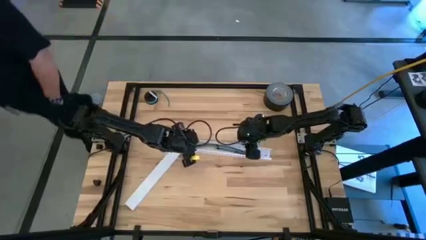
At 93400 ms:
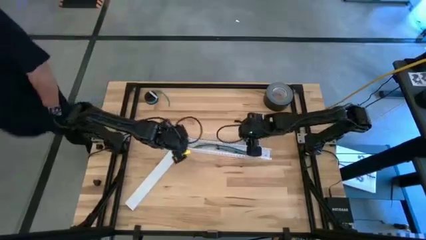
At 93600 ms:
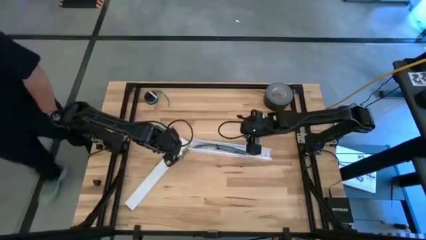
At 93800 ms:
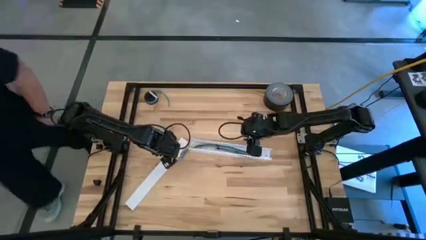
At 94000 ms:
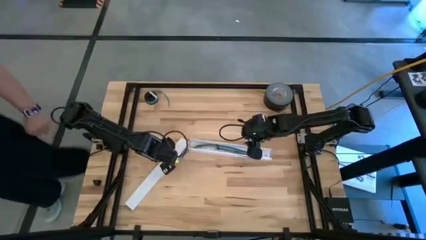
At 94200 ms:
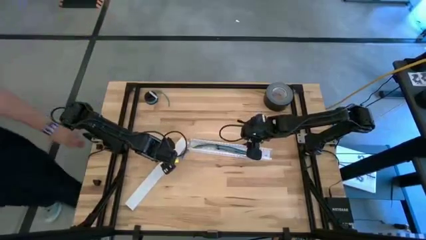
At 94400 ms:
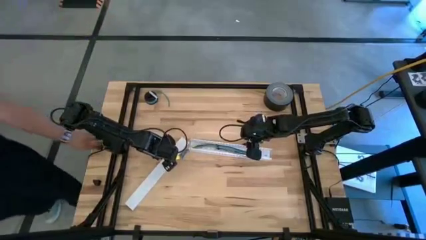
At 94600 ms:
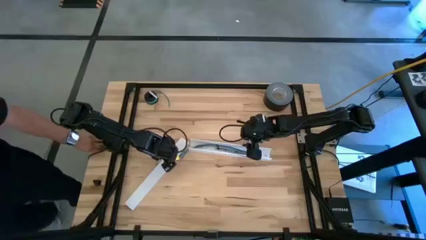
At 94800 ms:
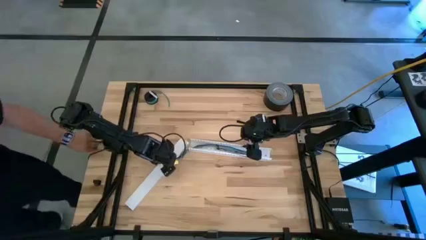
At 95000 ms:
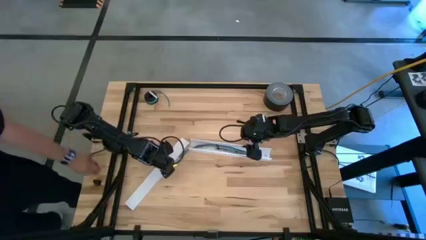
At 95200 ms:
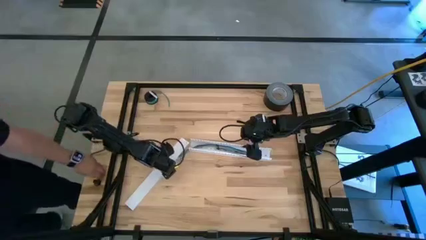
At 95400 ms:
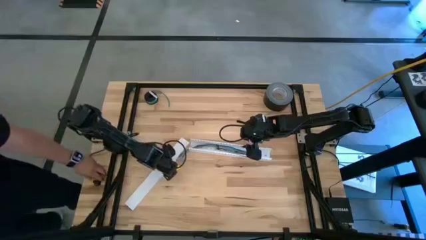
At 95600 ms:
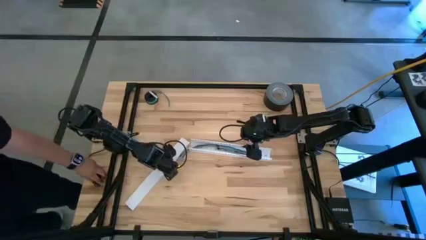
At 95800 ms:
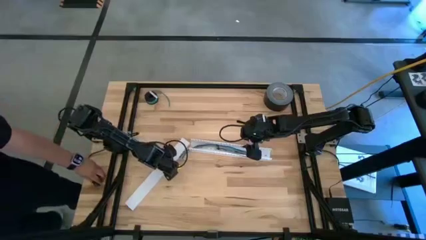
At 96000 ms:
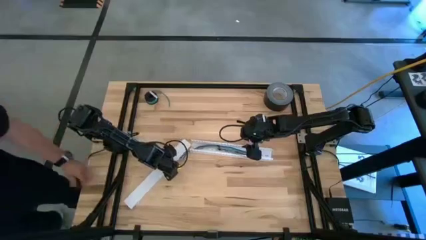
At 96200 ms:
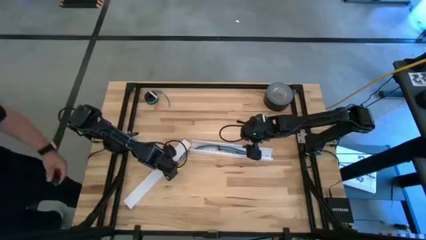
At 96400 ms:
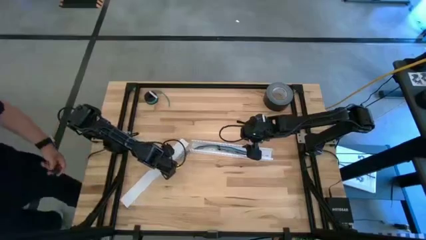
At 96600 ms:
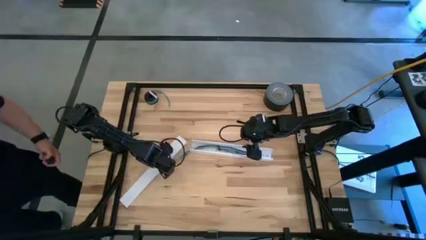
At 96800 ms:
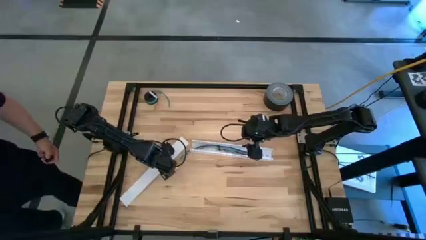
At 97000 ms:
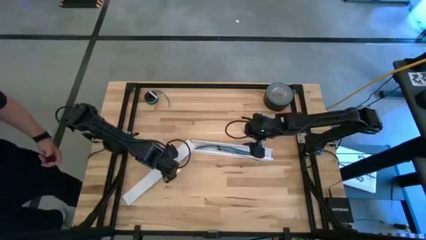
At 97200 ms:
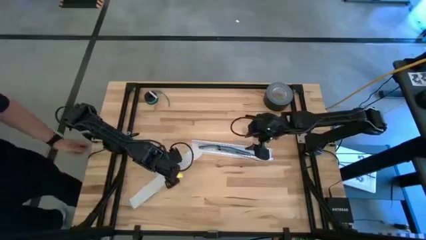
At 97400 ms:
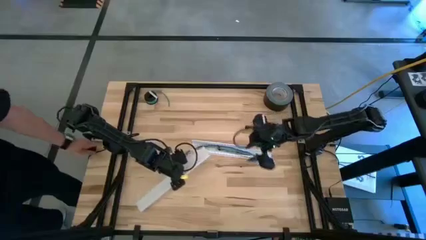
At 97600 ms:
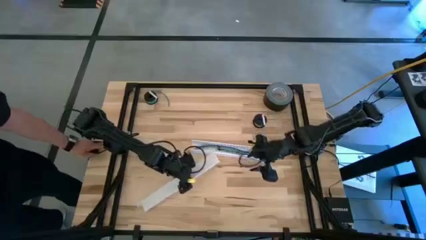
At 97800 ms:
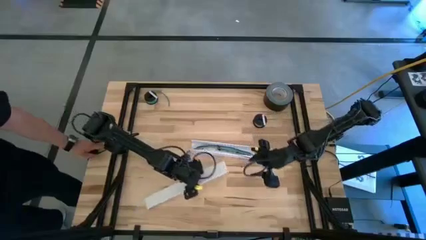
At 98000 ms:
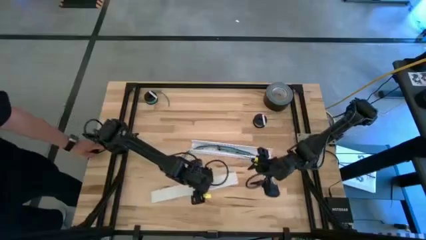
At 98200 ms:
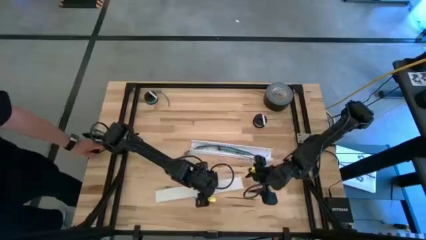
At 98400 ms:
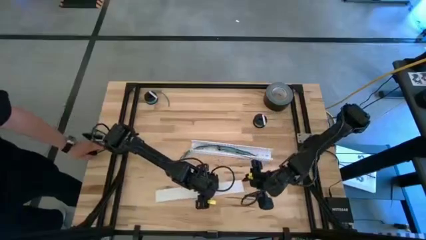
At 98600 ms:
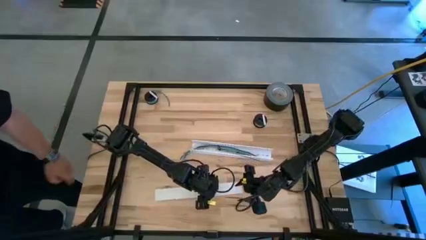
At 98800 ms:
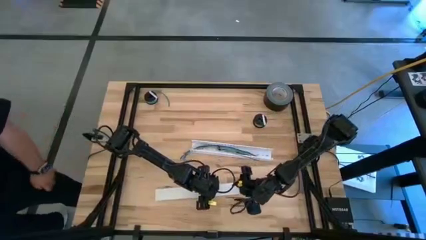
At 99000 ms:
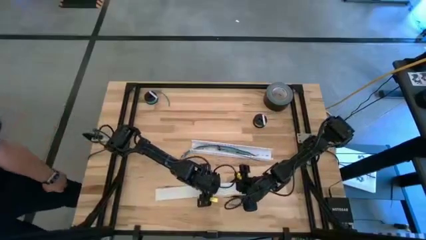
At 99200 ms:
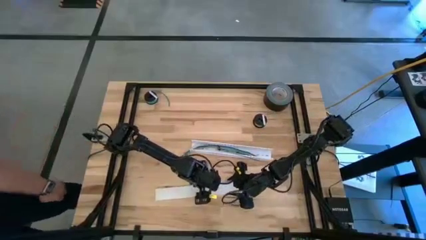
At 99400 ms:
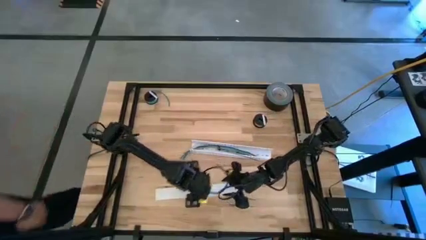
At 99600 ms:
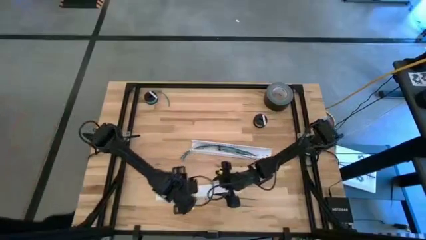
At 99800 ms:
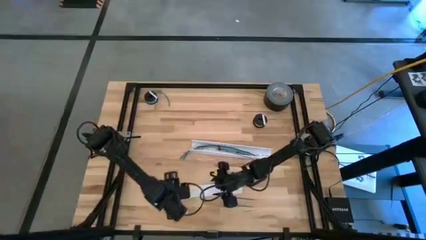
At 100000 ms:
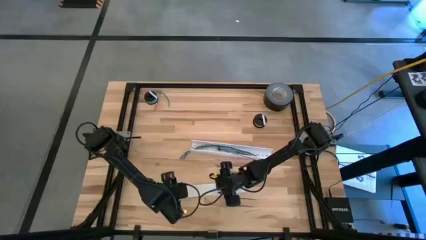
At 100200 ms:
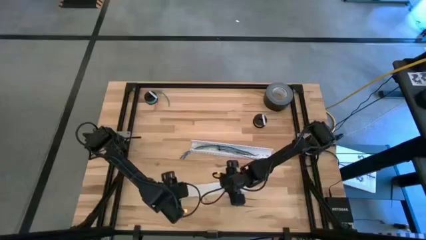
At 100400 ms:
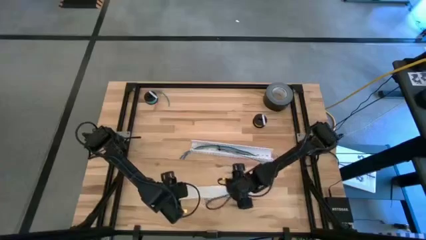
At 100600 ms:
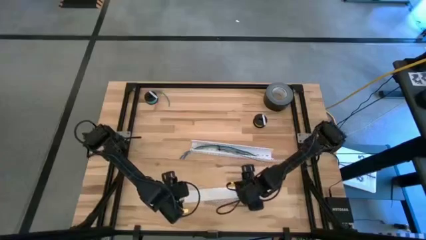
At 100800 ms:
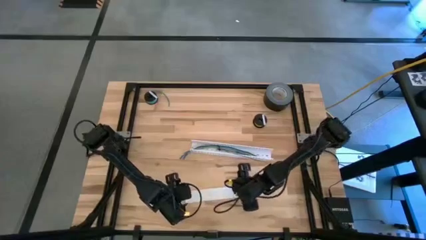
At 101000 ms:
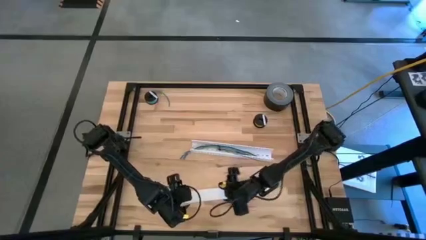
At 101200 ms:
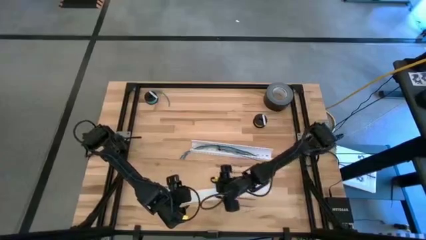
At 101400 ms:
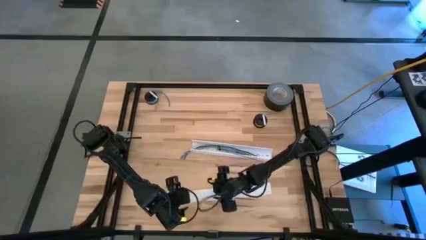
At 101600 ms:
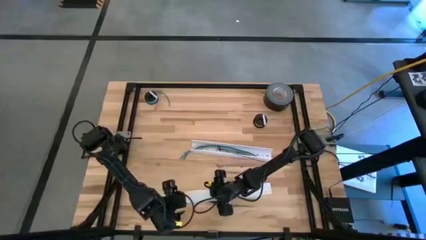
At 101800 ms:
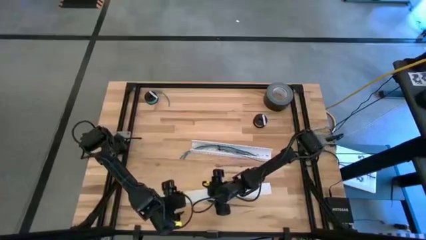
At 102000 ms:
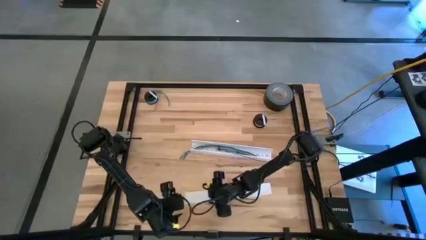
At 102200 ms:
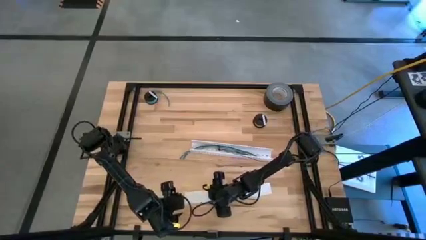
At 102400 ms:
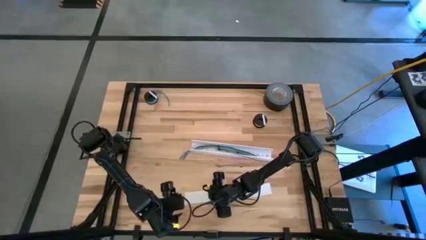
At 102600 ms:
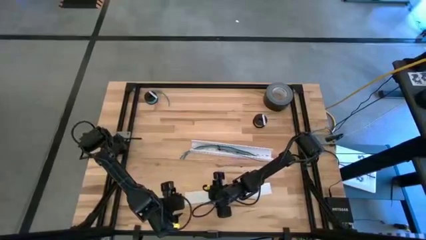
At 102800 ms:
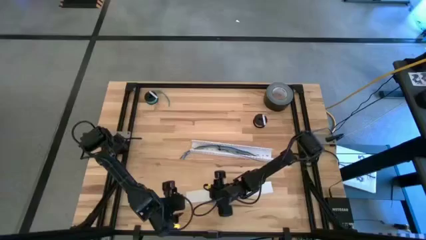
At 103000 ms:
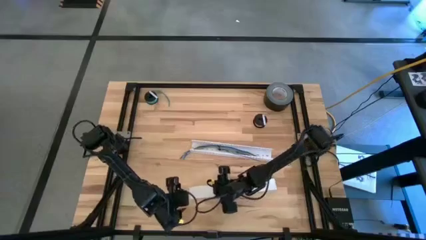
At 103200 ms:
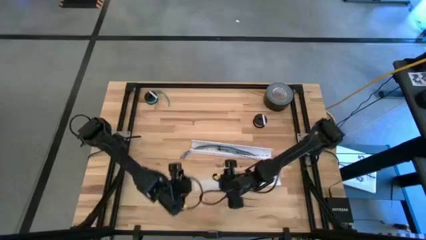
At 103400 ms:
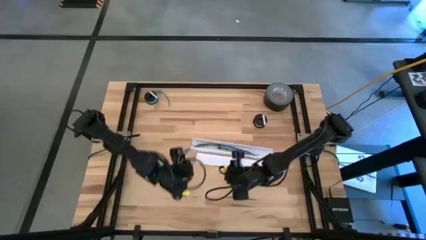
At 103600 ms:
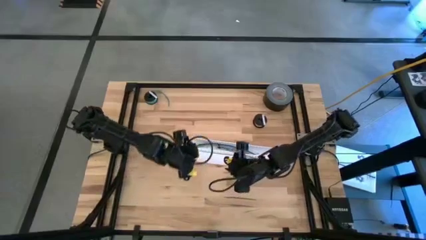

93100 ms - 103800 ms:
Task: Ziptie cables
Close the white cable duct

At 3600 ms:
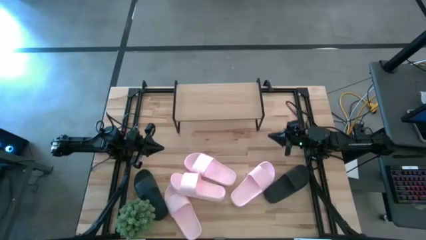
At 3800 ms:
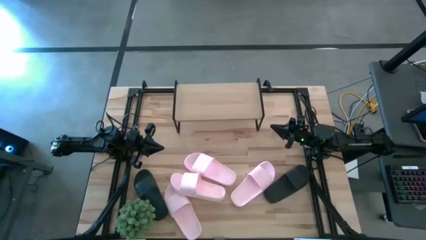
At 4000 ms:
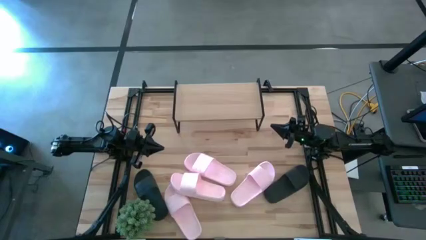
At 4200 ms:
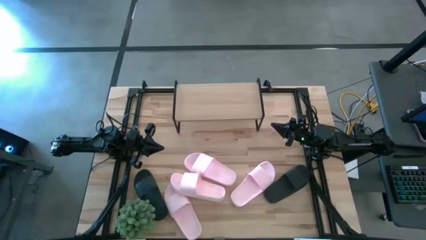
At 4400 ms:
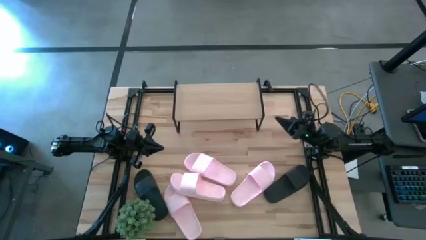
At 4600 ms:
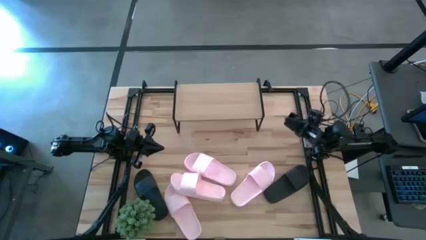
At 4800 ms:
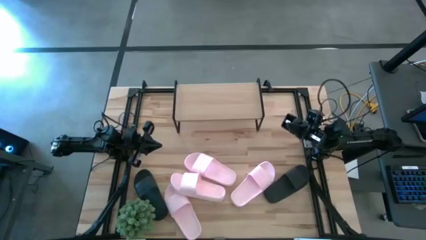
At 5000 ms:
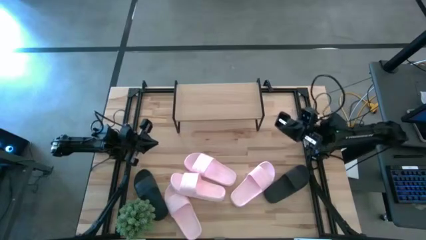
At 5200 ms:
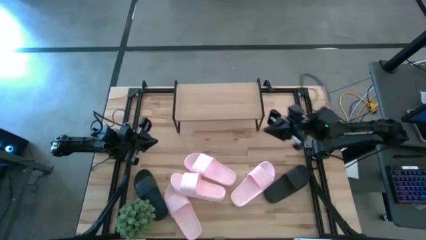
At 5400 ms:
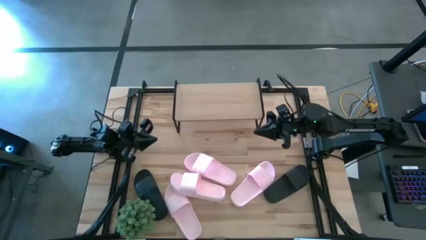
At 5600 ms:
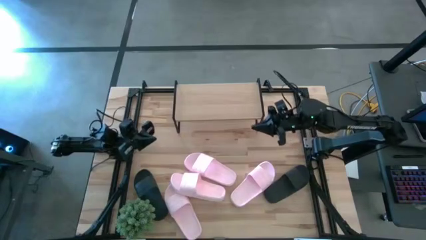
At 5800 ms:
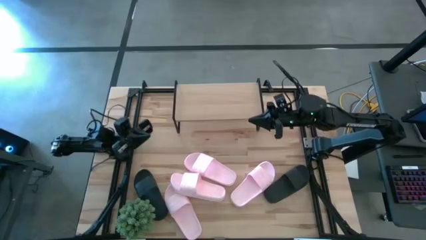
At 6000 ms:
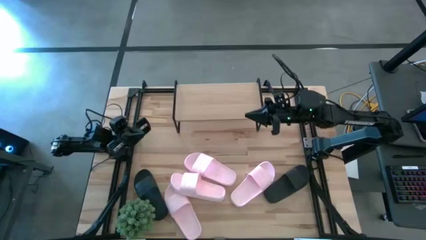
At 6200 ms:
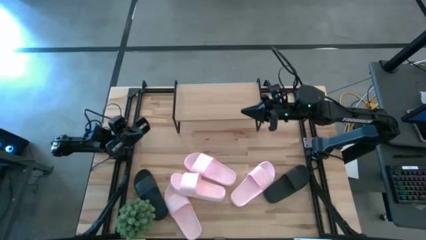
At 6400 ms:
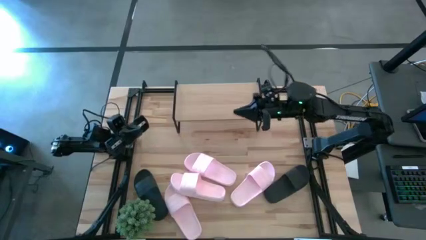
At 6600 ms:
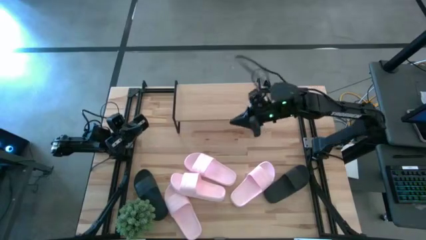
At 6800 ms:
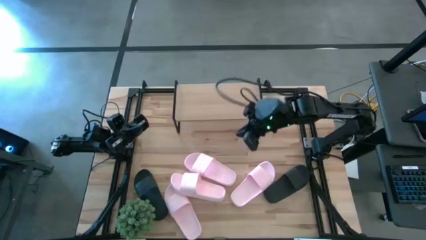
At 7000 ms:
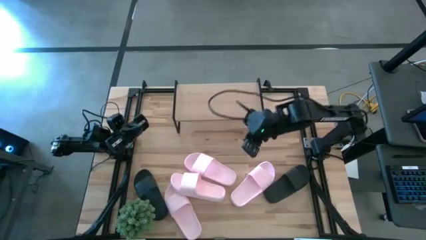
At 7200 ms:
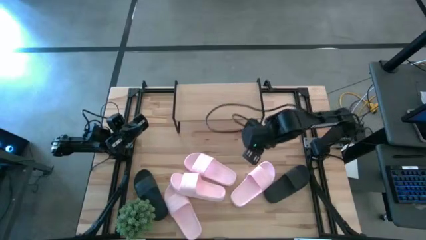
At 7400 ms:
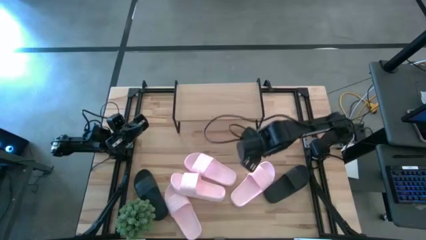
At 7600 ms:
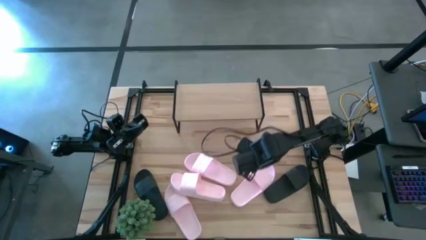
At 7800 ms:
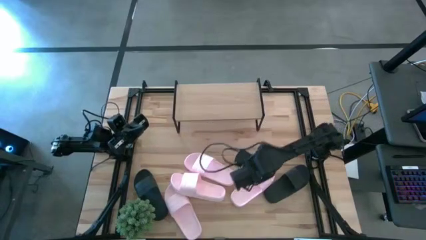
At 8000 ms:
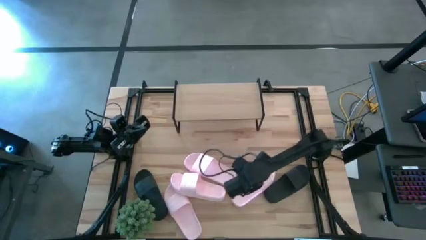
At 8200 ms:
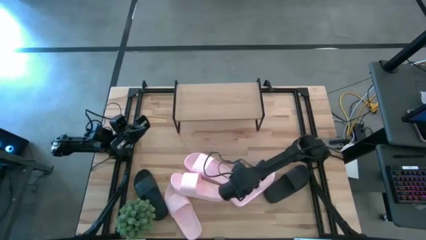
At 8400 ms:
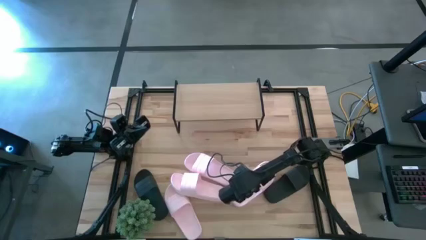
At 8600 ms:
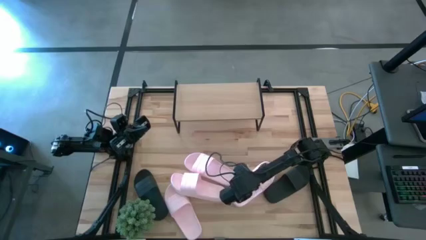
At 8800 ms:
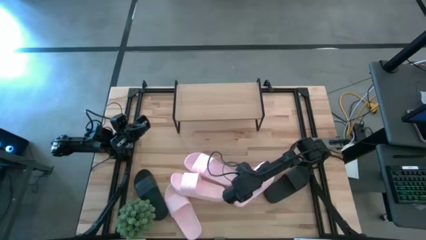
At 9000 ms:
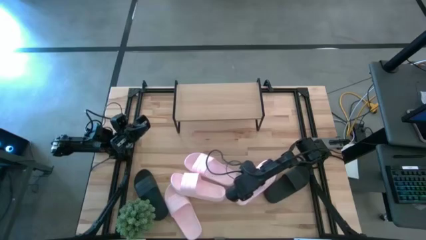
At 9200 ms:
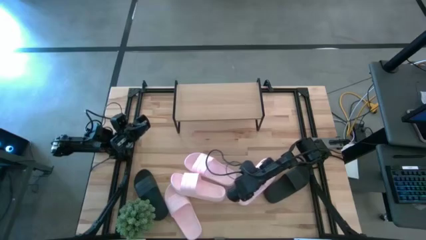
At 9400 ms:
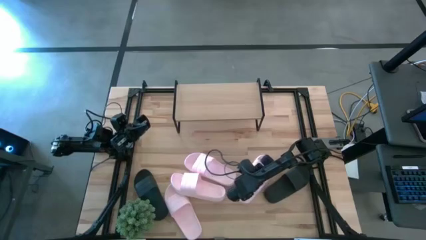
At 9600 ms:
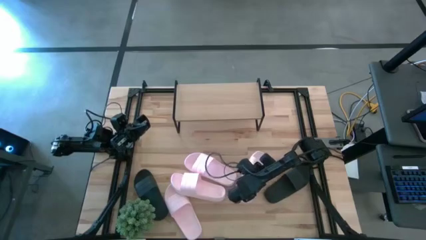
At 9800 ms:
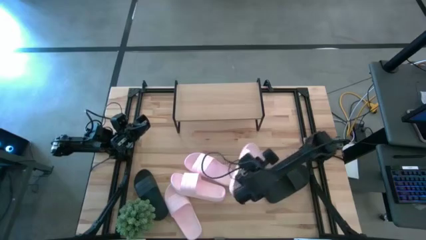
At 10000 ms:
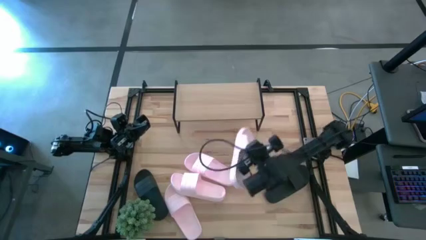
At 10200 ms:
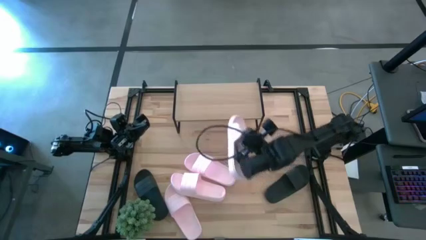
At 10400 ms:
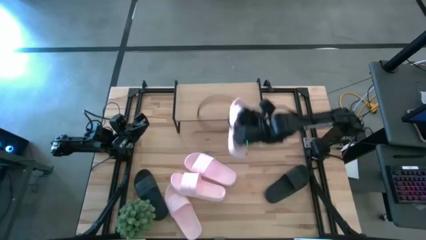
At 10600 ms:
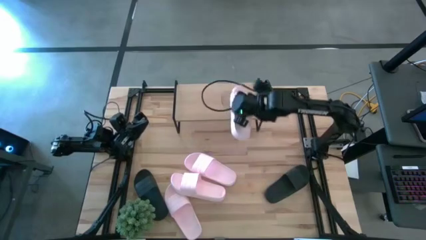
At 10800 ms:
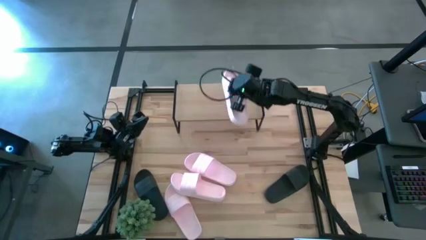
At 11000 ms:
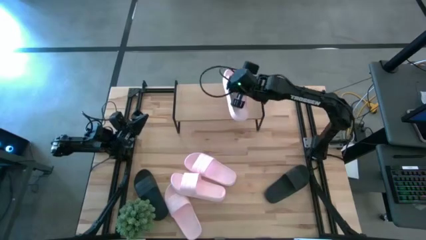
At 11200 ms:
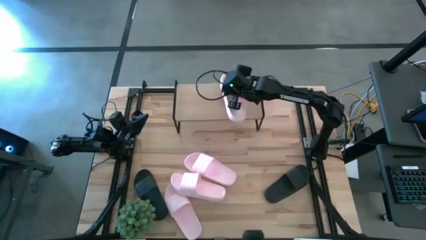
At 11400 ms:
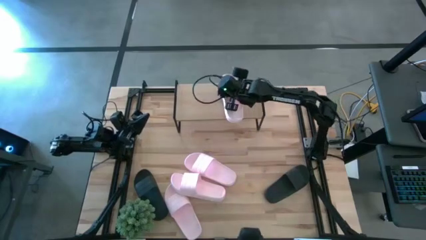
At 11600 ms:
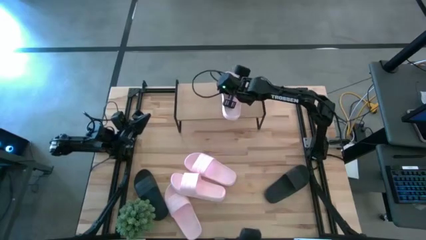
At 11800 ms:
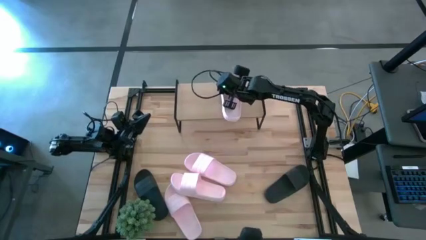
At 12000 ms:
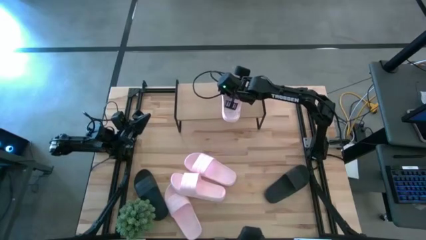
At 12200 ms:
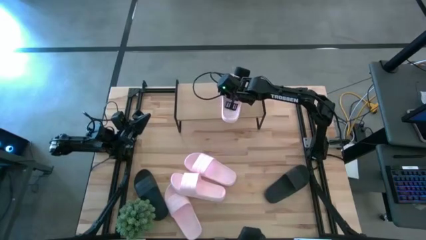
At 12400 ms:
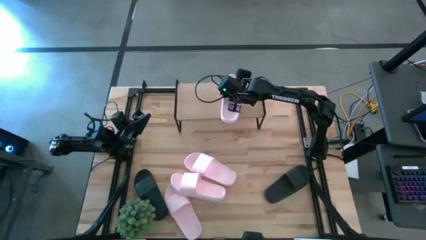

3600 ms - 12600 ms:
Task: Pick and place slides into the shelf
Put the pink sandal on the shelf
